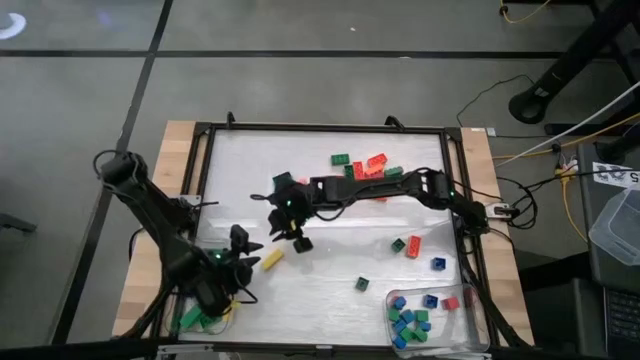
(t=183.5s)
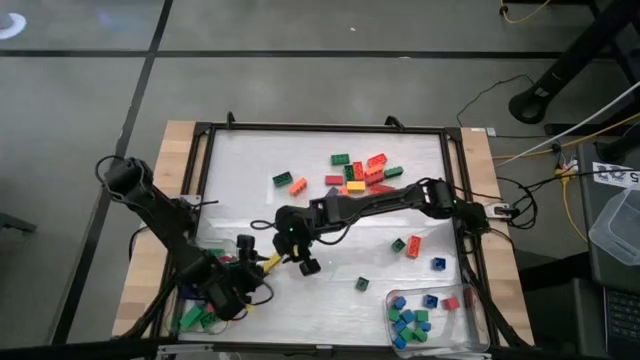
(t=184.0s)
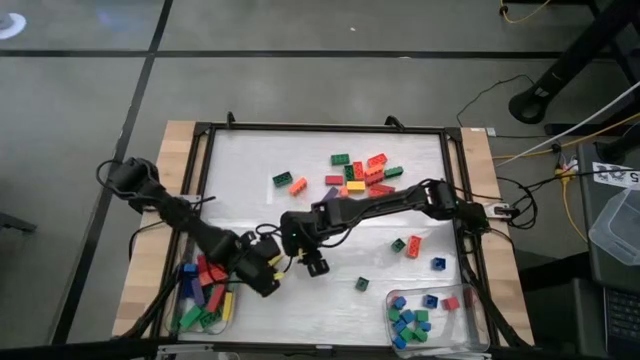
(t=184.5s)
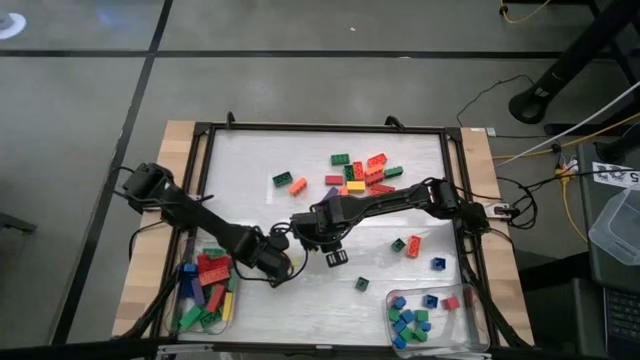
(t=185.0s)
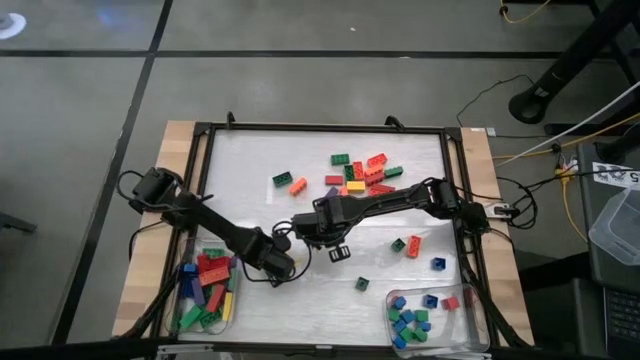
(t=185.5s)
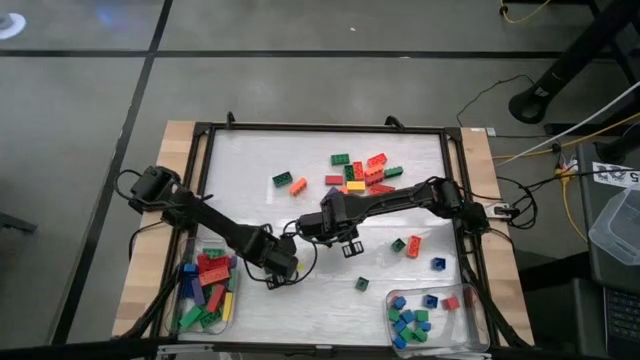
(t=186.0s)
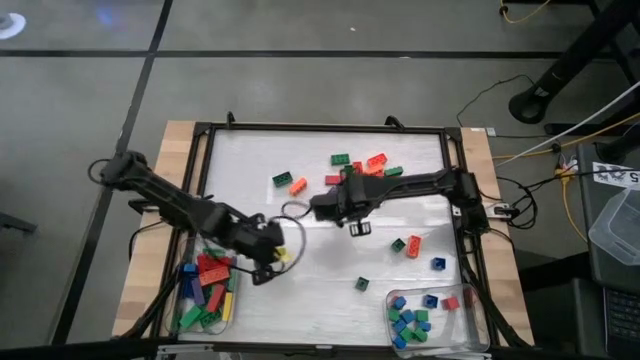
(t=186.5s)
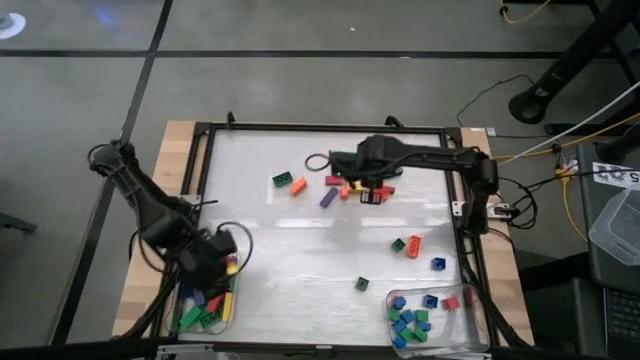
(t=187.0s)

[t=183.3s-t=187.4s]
Task: Sort blocks by size
Put the large yellow block into the left transparent bin

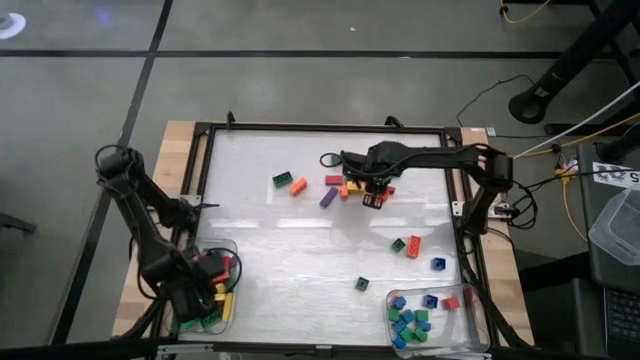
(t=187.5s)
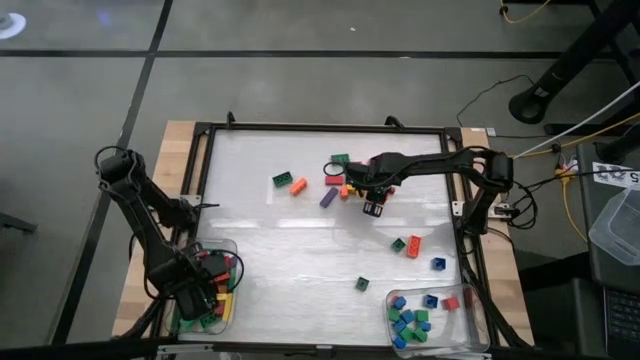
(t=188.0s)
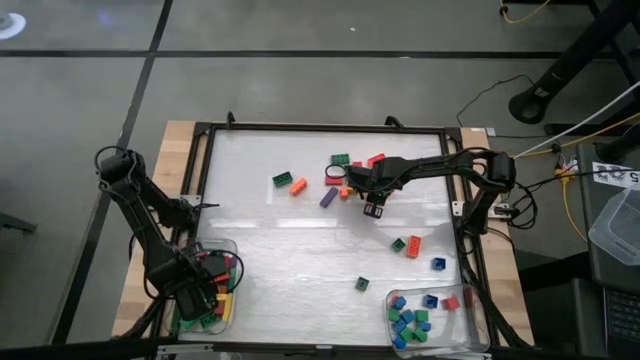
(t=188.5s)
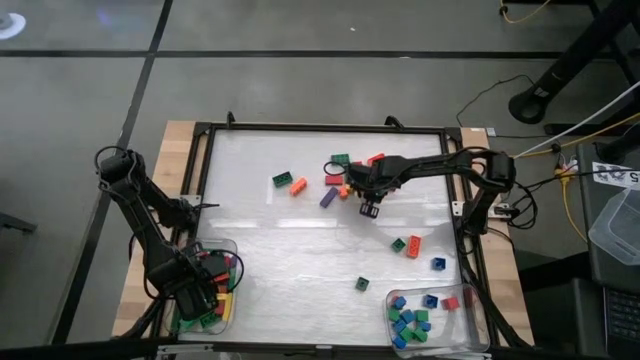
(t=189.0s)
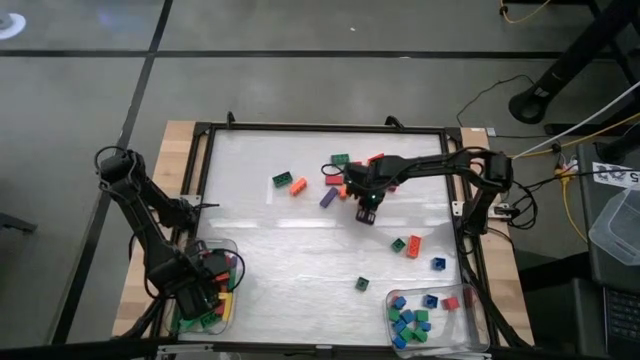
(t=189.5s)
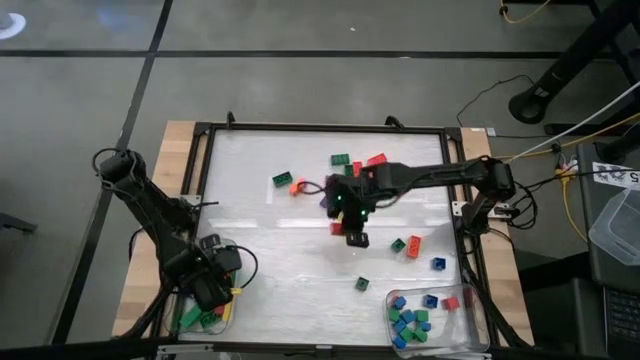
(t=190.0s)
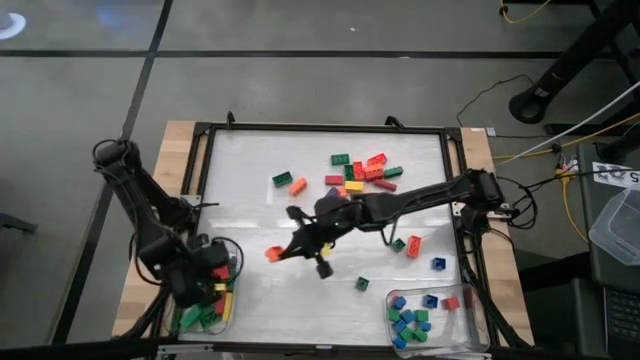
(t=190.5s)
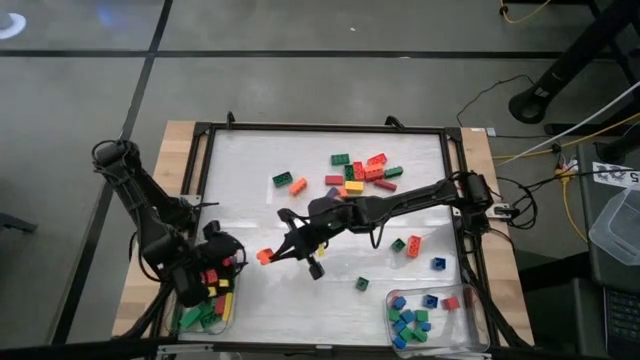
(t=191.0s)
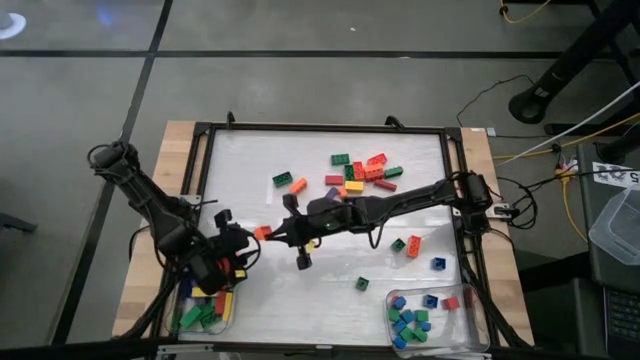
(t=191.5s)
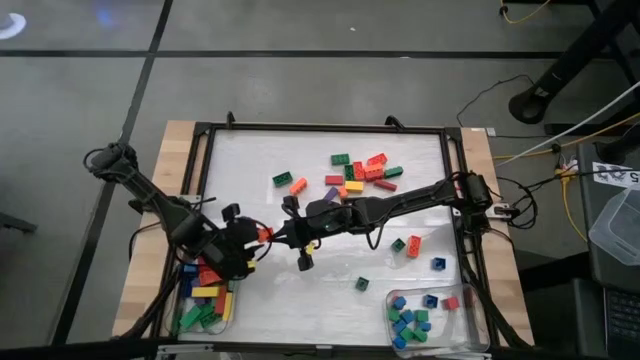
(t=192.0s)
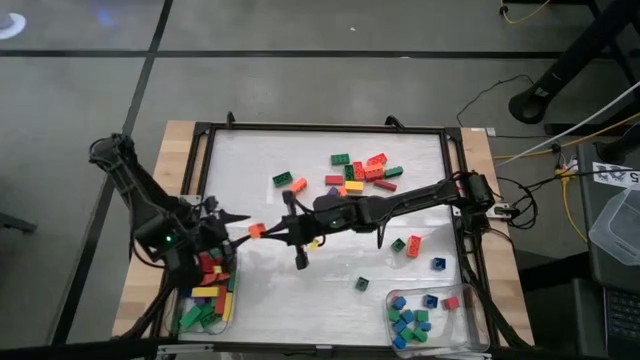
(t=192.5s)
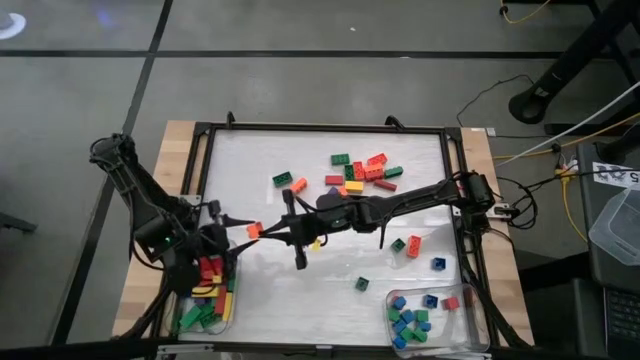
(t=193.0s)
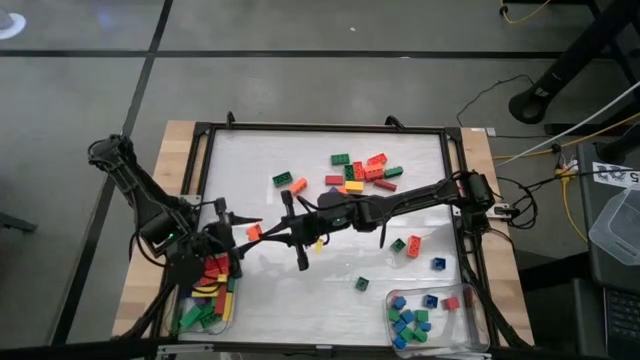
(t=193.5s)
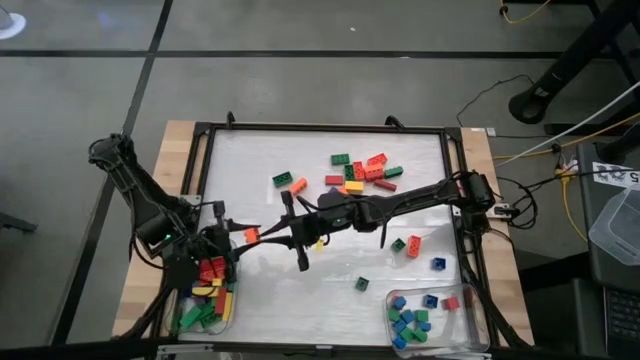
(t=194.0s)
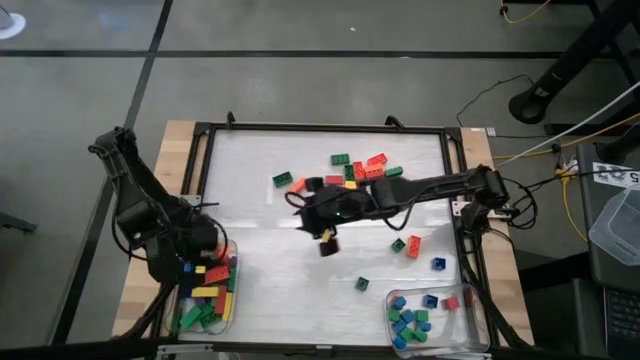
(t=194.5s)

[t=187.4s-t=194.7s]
Put the large orange game piece into the left transparent bin

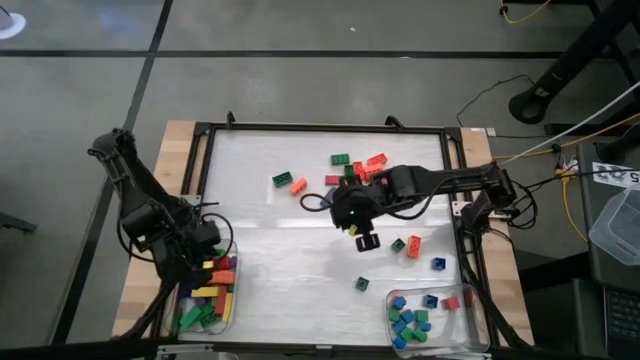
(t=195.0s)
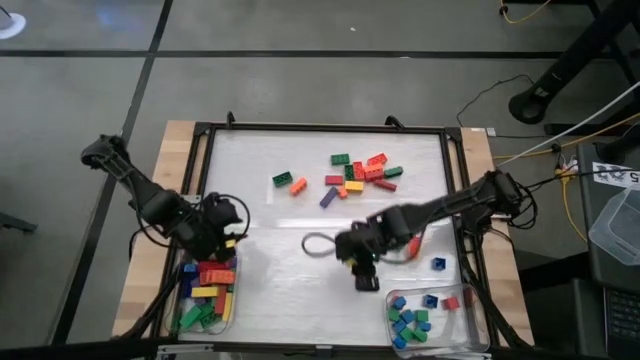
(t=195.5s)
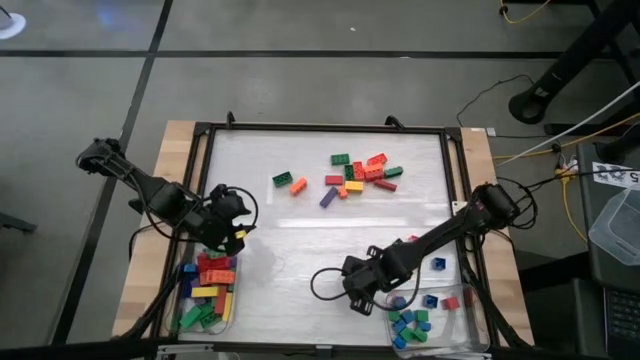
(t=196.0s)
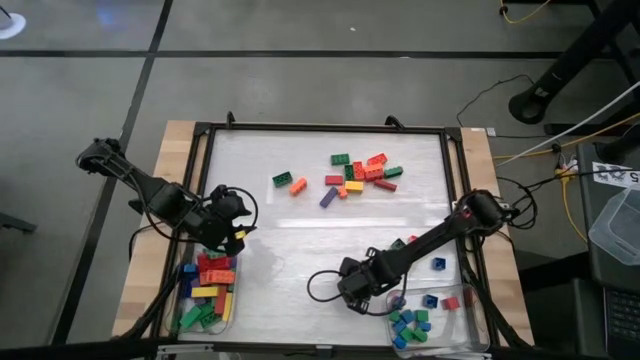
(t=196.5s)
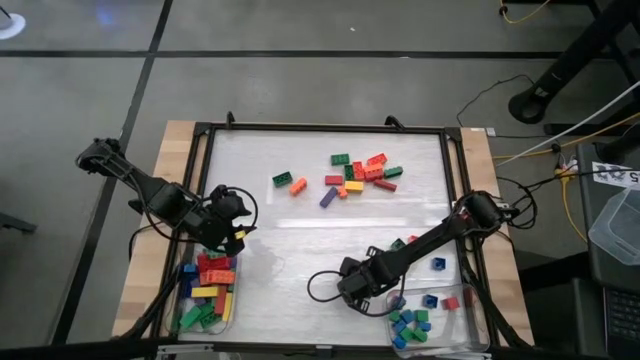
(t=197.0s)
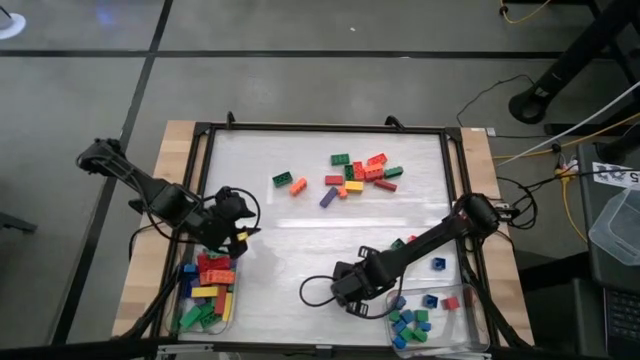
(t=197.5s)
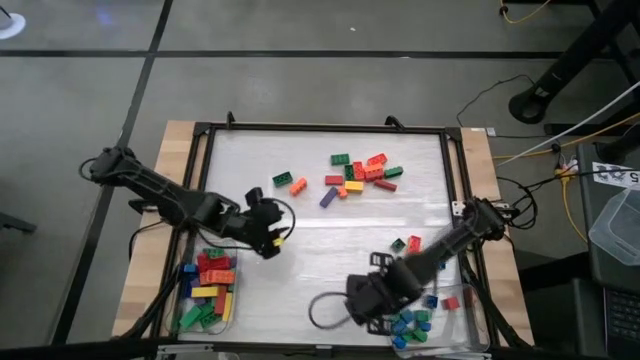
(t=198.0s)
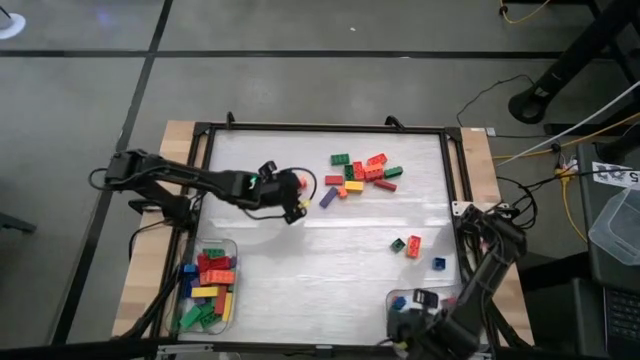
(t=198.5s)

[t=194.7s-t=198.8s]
Put the small green game piece into the right transparent bin

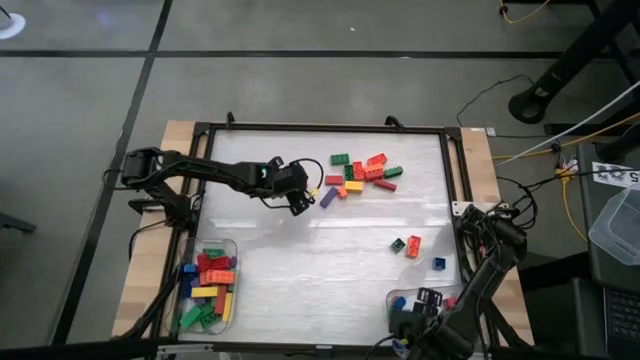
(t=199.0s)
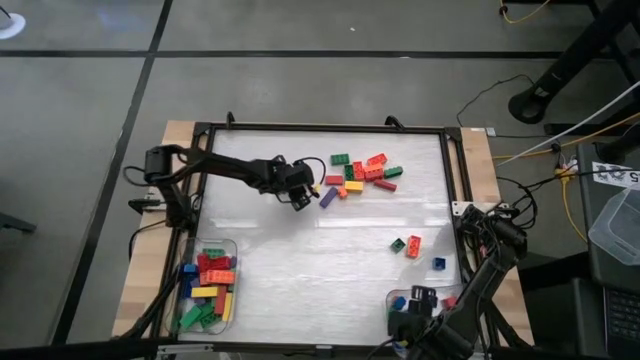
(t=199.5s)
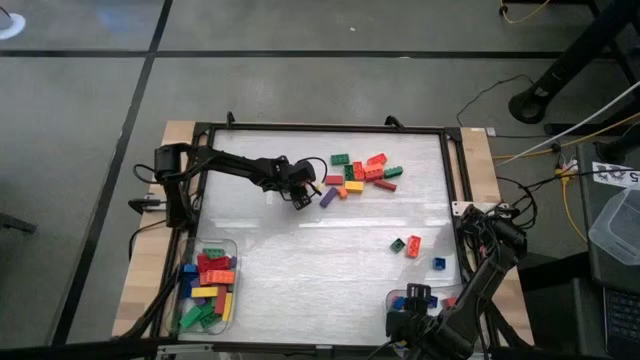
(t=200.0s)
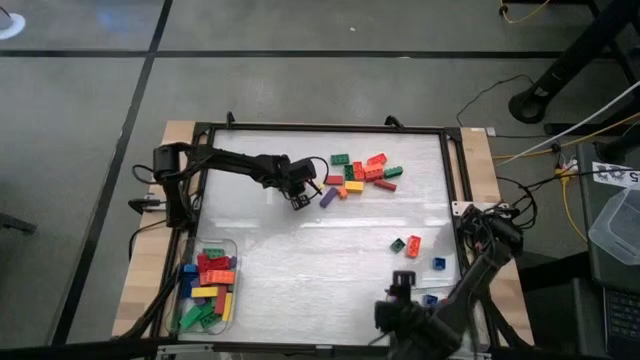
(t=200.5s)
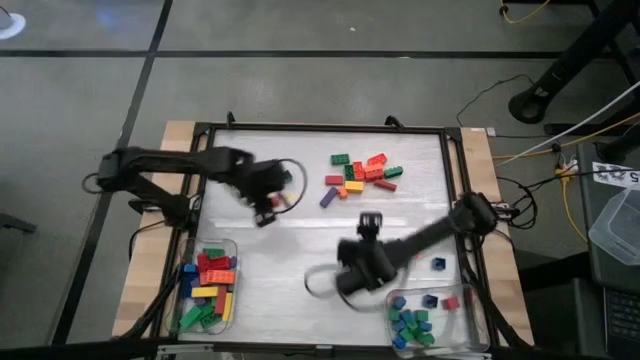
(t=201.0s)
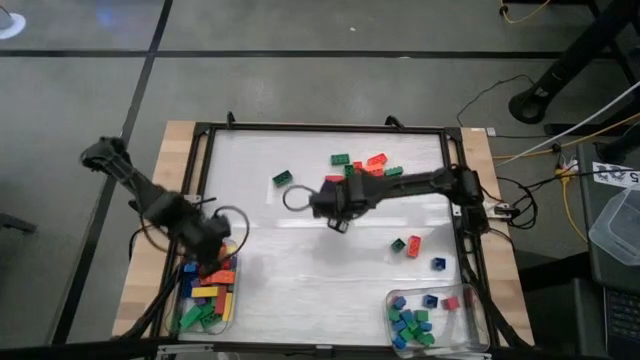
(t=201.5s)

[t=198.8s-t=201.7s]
Put the large orange game piece into the left transparent bin

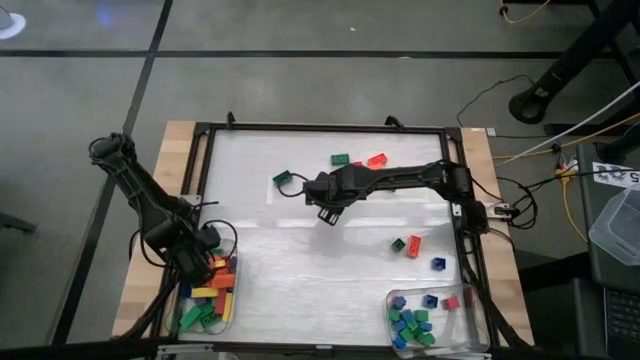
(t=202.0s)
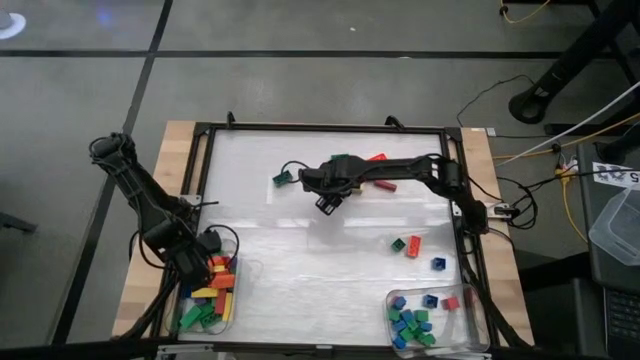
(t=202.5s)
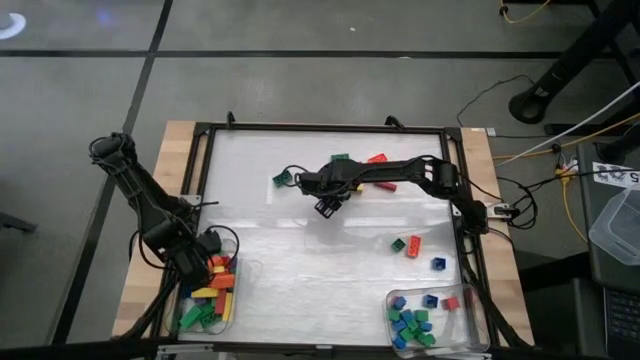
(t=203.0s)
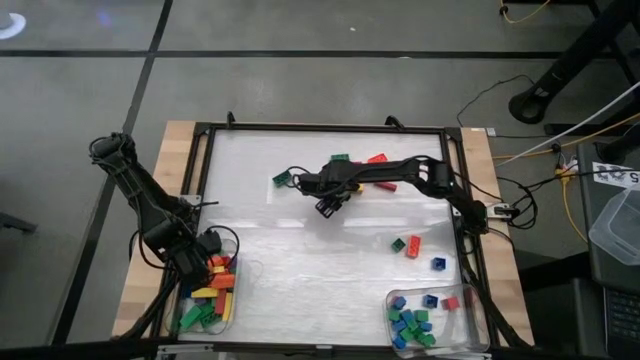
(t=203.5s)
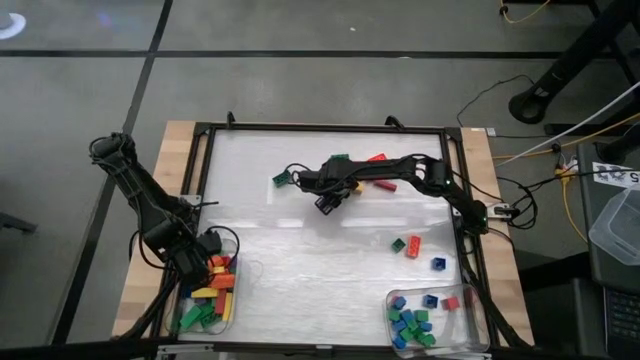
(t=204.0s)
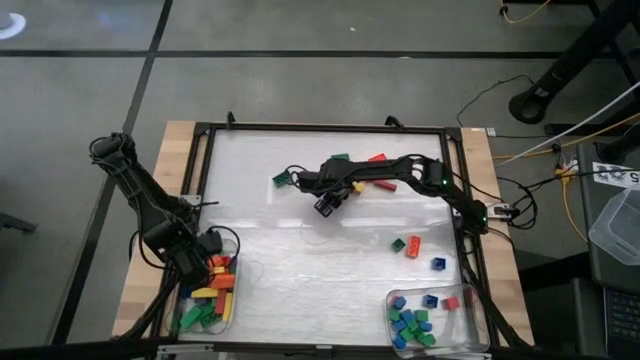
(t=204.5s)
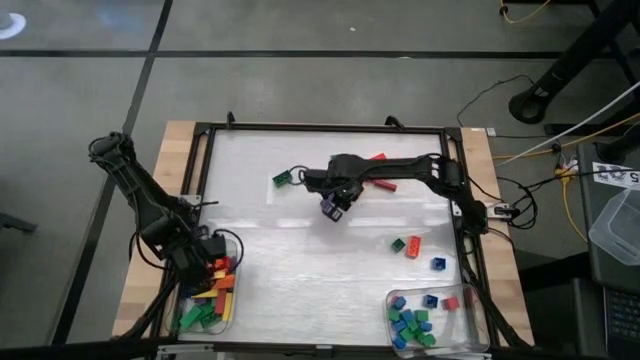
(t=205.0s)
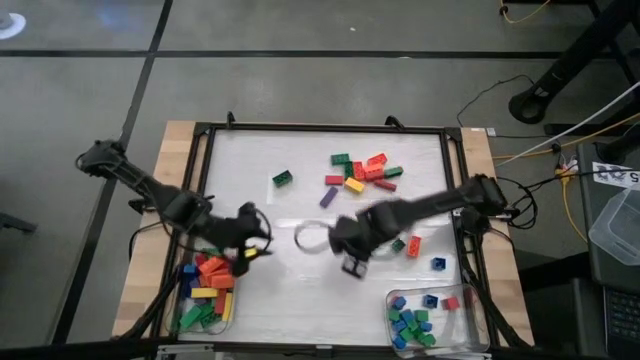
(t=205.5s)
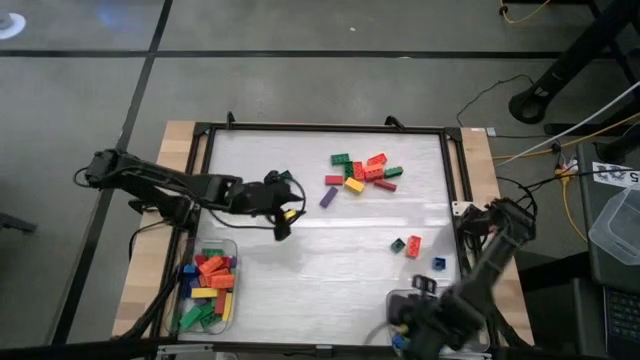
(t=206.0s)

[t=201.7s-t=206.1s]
Put the small orange game piece into the right transparent bin
